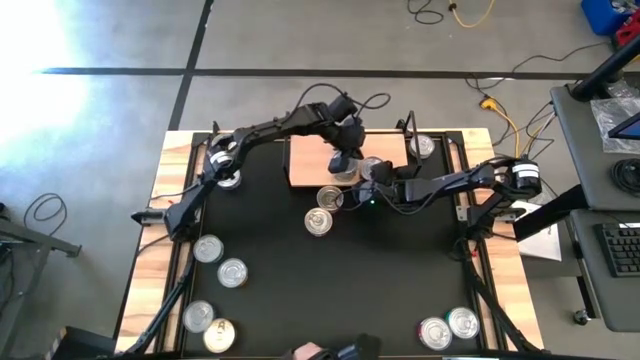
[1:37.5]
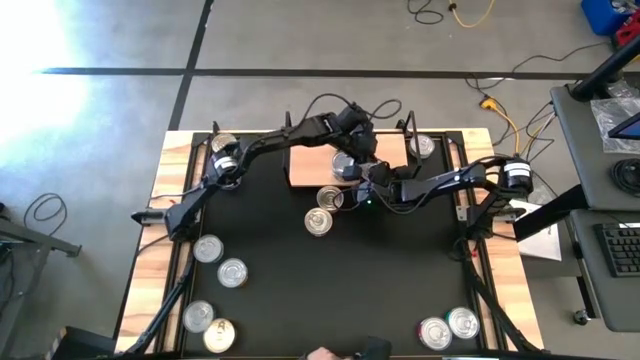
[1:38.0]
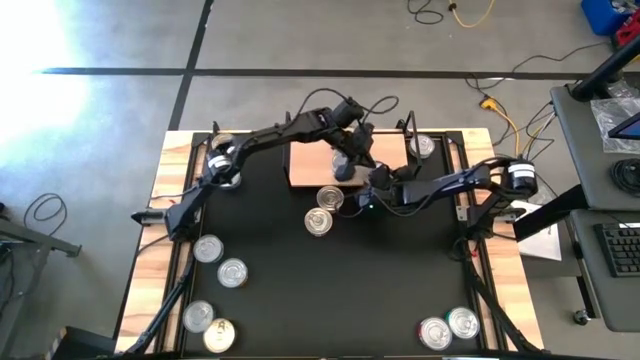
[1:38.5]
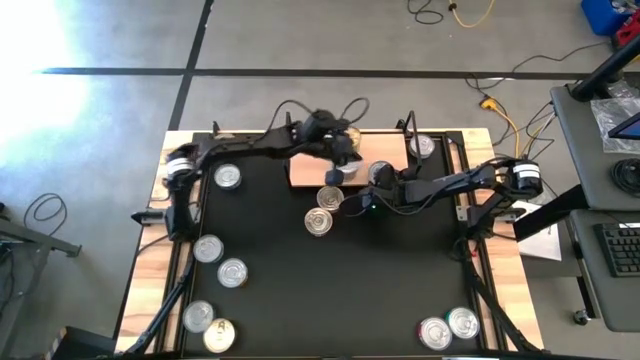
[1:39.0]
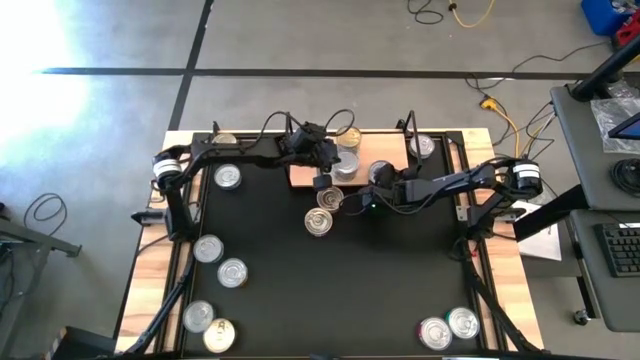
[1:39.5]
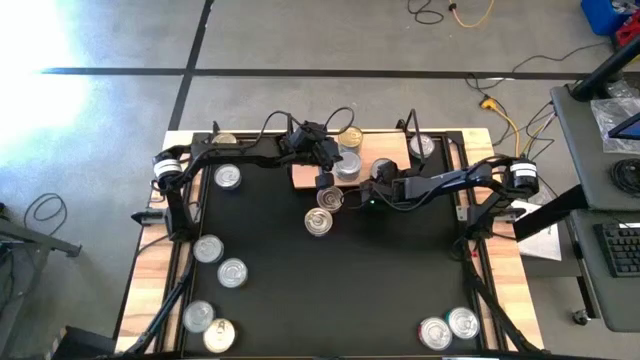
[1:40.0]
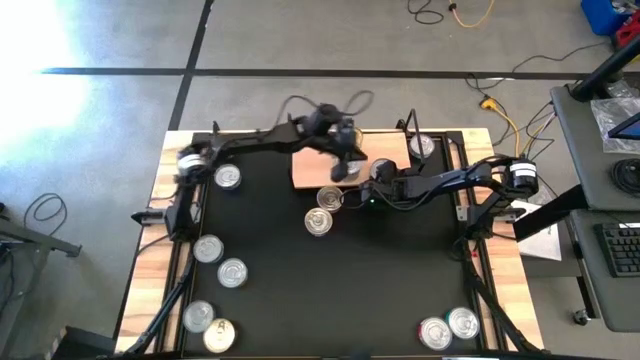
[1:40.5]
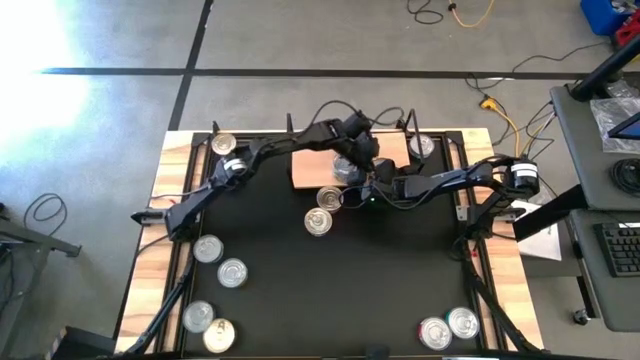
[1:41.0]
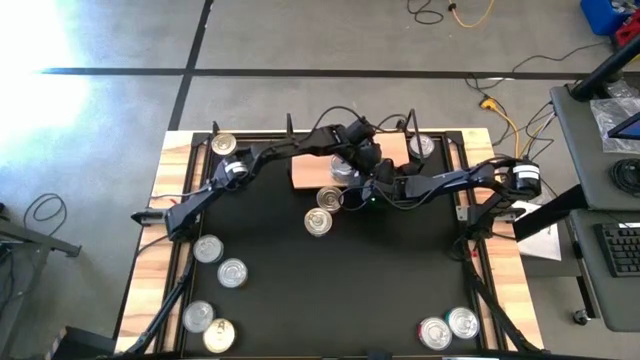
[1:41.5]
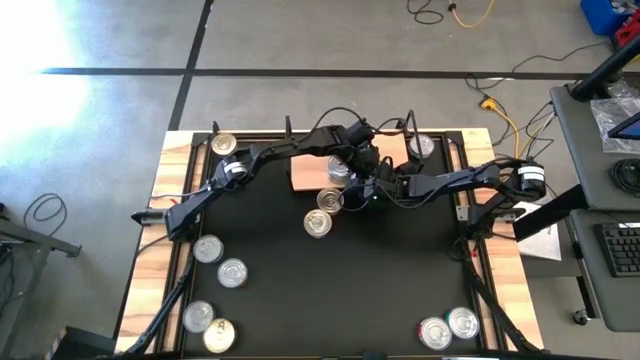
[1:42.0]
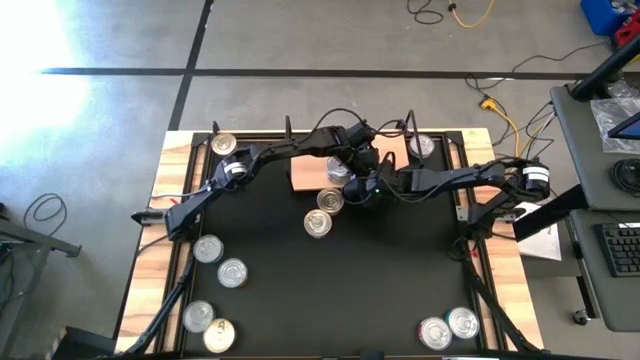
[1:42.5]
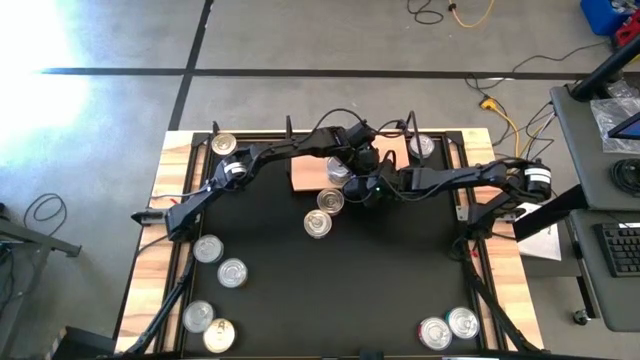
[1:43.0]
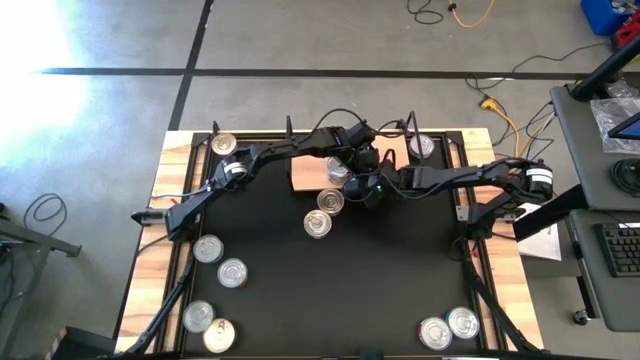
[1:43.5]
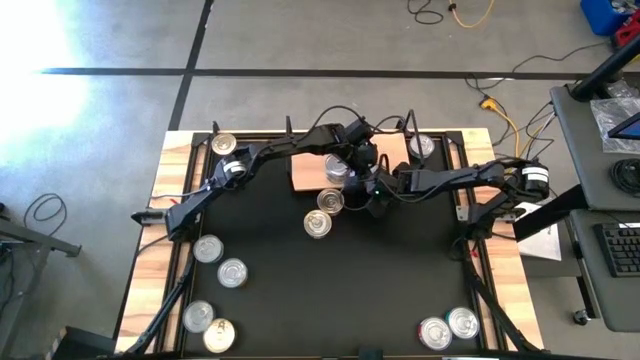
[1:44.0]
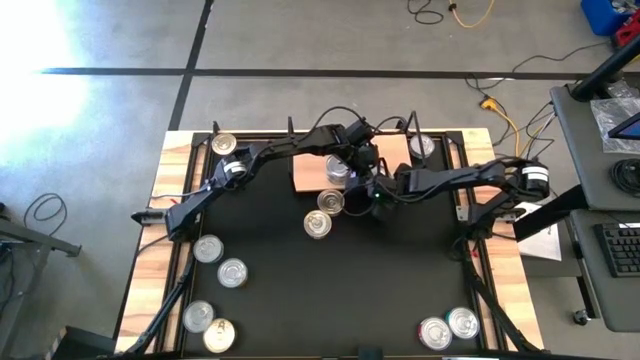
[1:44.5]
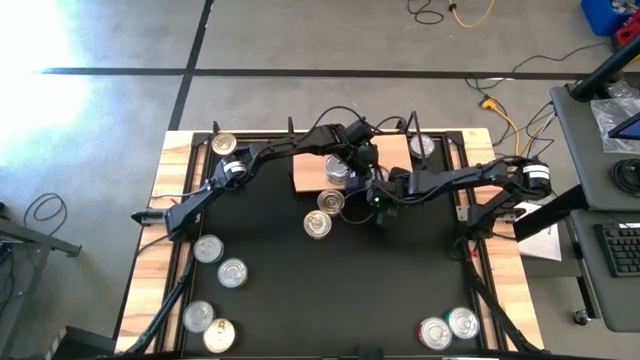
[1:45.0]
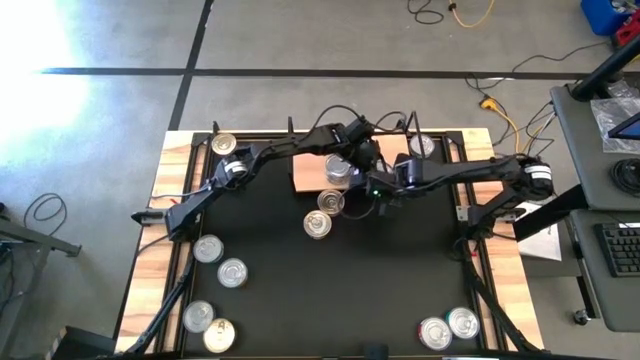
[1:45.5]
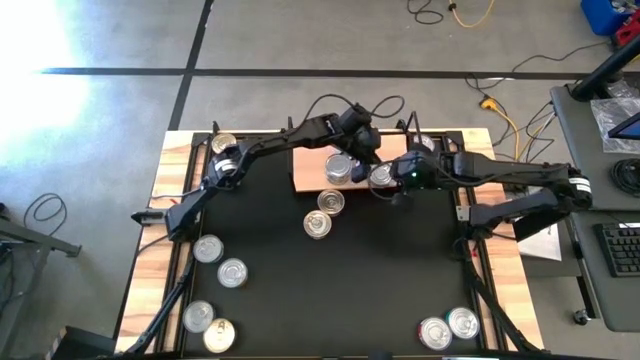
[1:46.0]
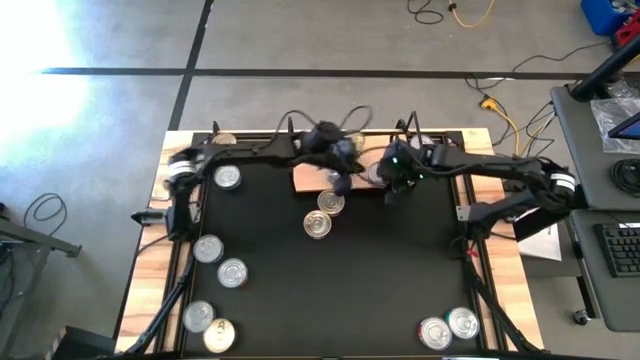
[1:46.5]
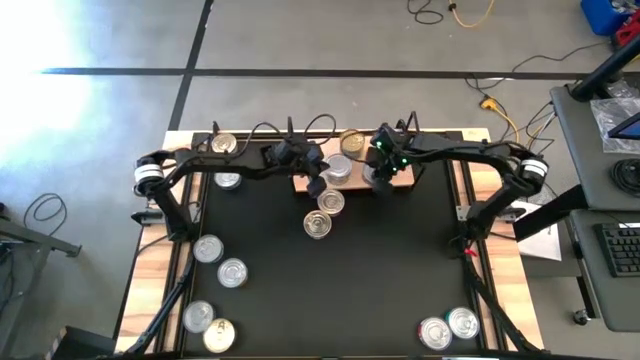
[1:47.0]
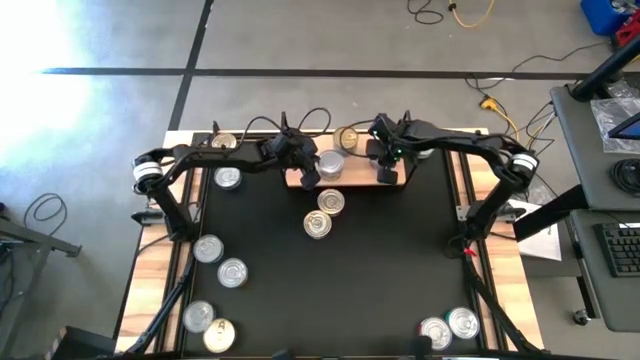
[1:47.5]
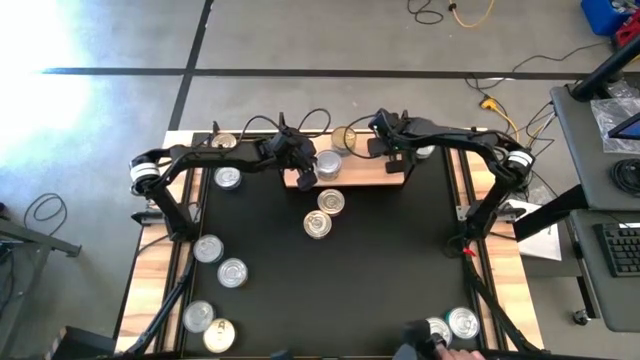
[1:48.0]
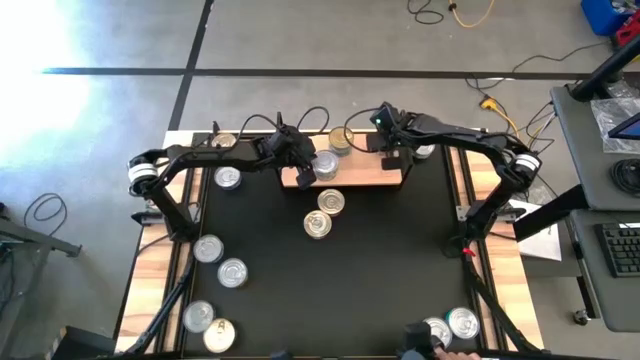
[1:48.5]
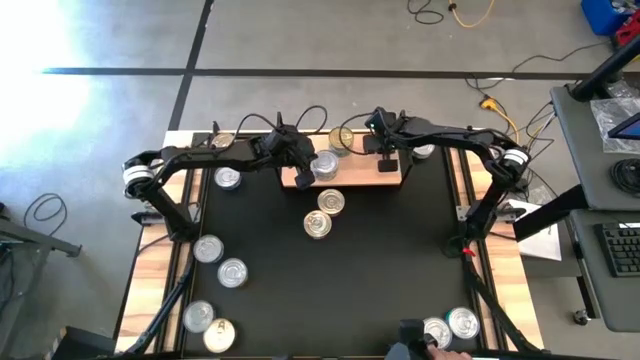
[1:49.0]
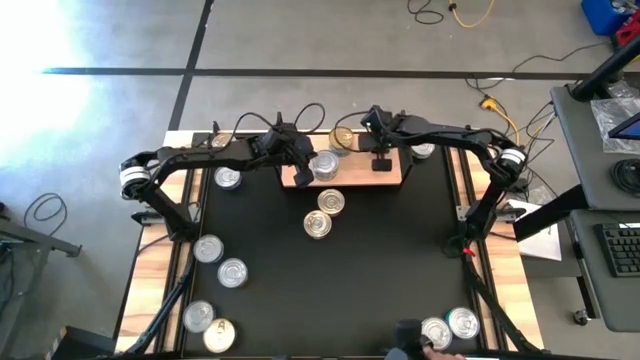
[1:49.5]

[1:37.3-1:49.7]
Task: Stack canned seafood by type on shelf
Put the red tuna can on the shelf

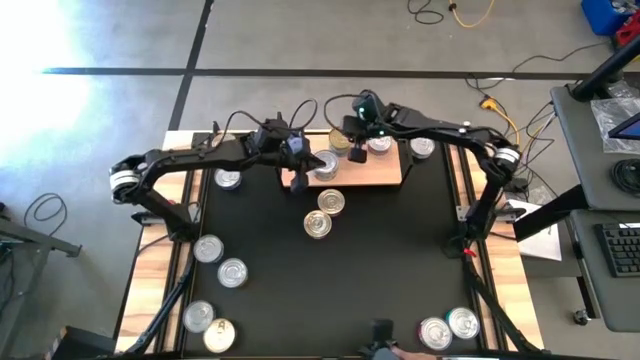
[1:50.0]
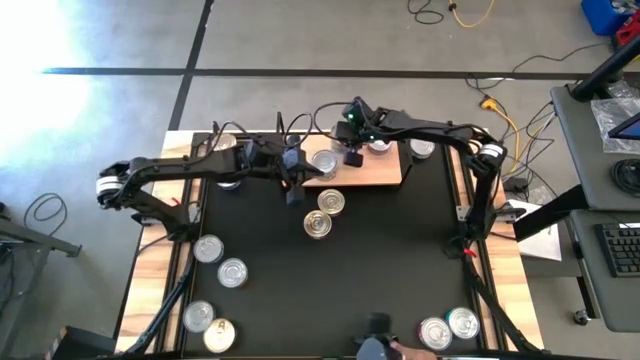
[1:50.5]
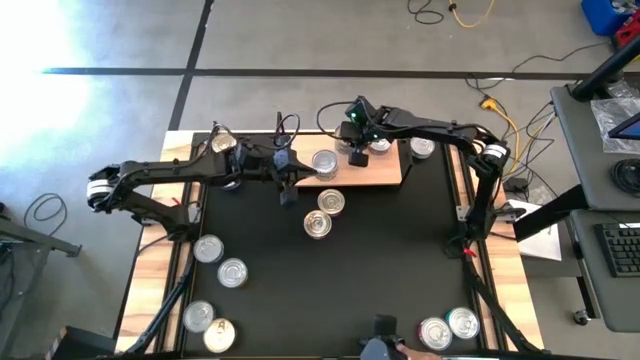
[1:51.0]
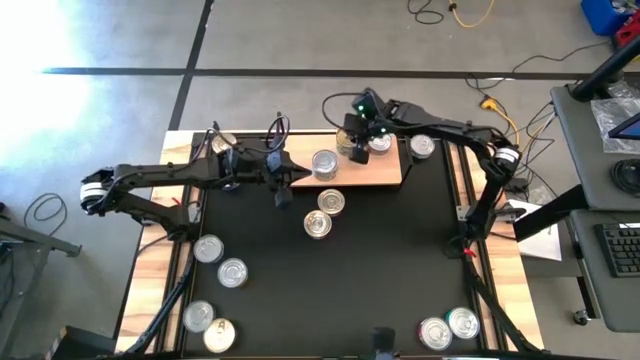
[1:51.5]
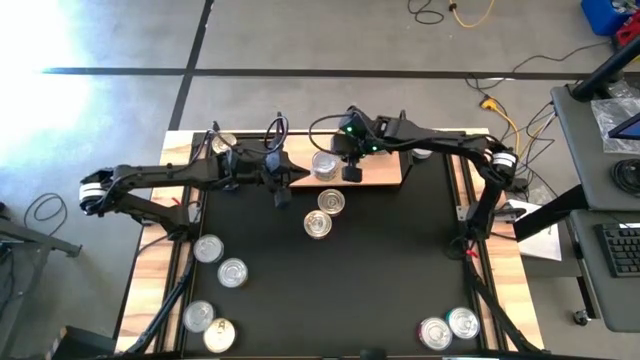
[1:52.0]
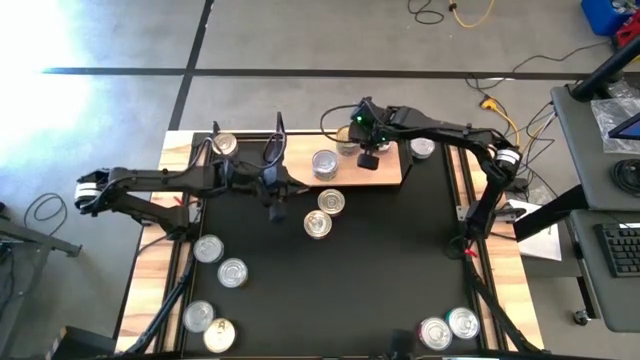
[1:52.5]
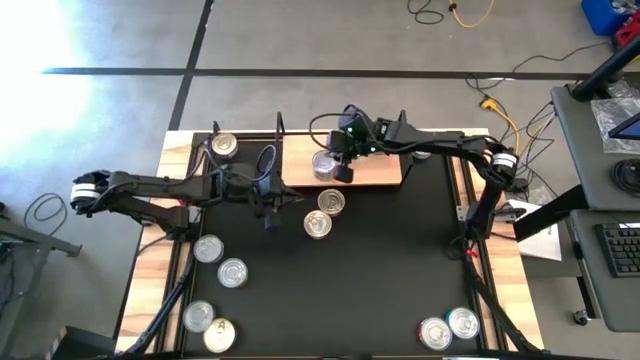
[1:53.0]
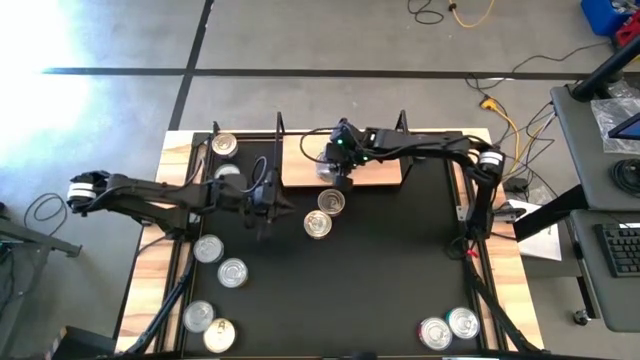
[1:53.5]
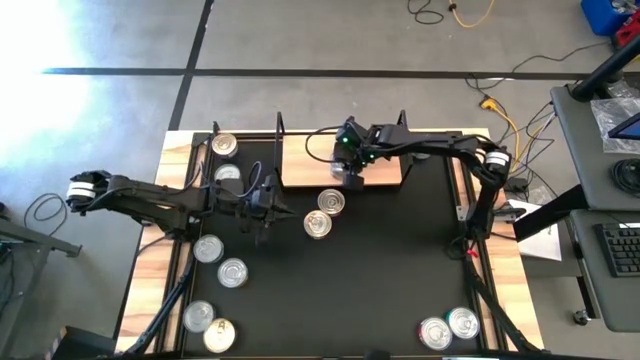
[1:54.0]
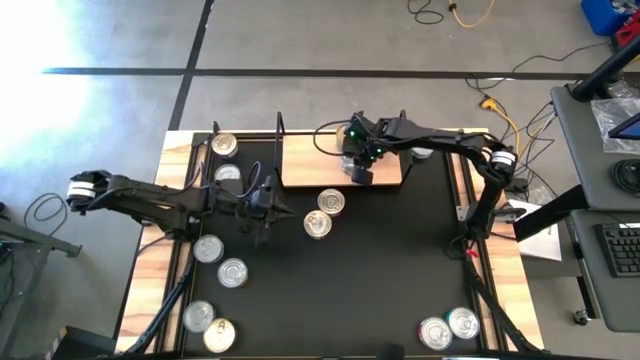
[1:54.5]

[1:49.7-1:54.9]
Adjust the green tuna cans on the shelf
